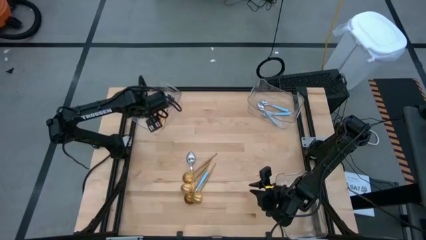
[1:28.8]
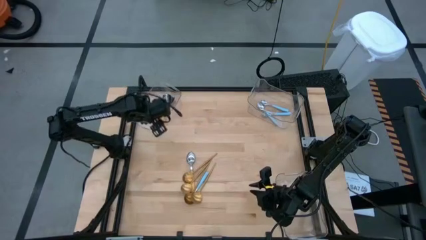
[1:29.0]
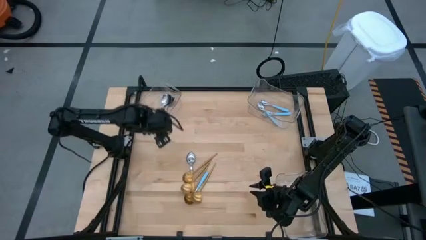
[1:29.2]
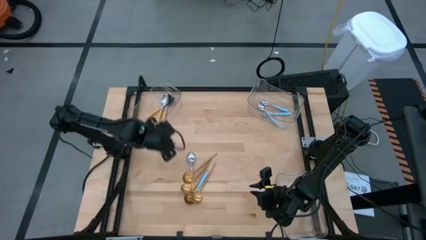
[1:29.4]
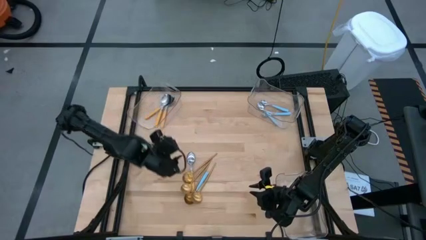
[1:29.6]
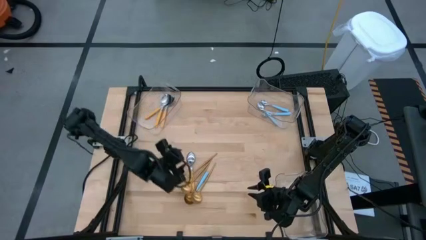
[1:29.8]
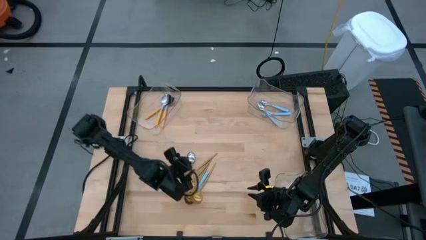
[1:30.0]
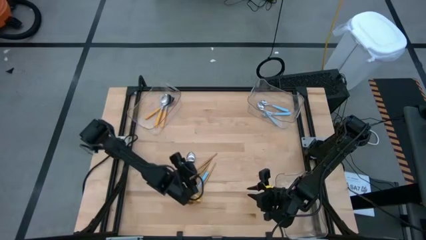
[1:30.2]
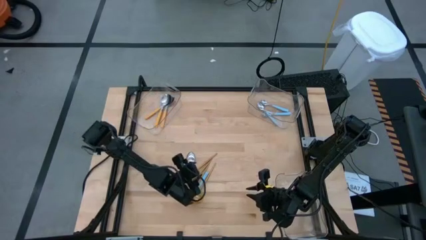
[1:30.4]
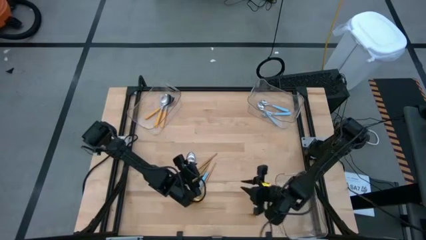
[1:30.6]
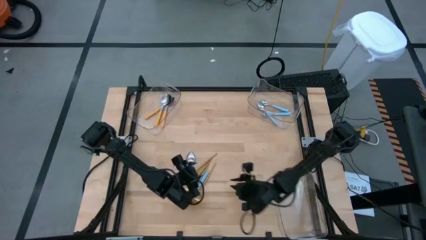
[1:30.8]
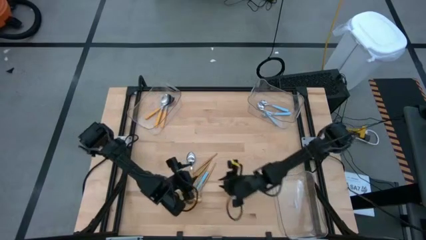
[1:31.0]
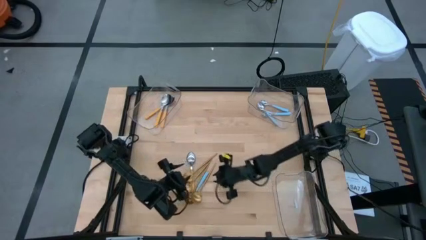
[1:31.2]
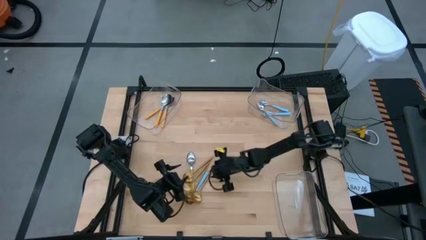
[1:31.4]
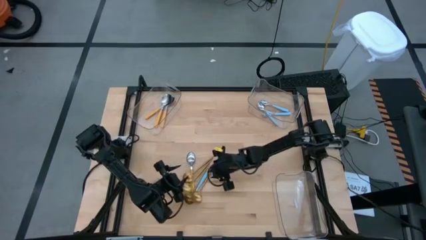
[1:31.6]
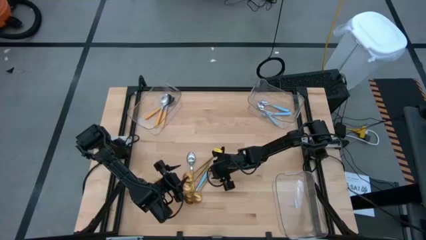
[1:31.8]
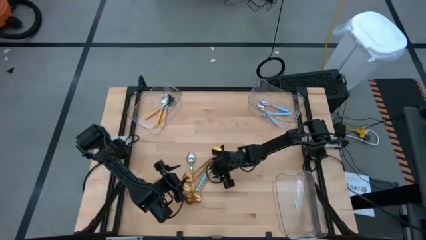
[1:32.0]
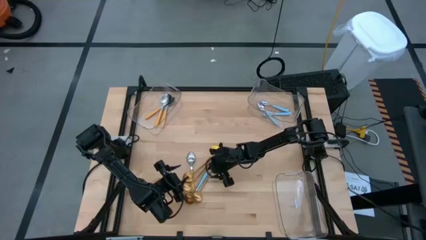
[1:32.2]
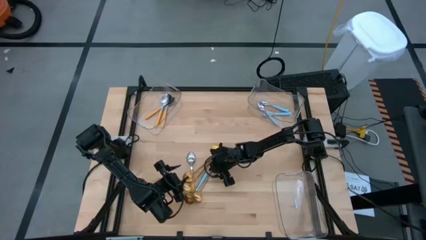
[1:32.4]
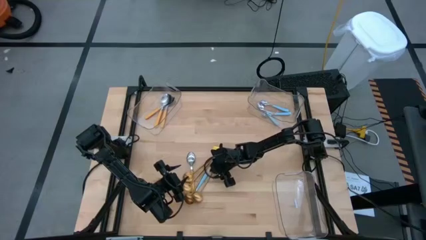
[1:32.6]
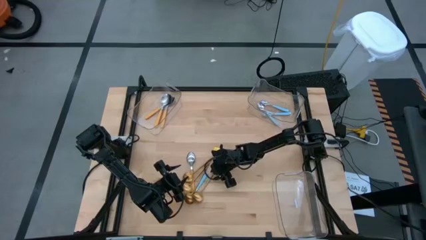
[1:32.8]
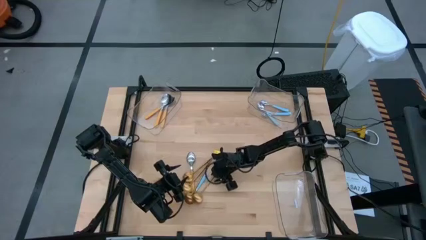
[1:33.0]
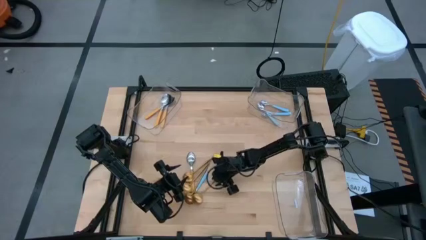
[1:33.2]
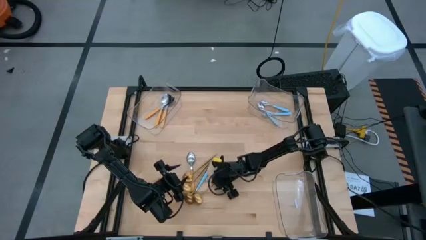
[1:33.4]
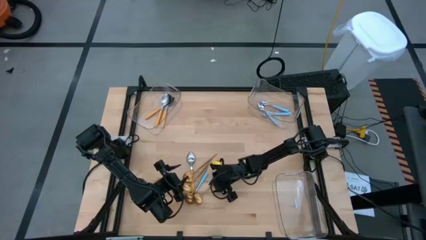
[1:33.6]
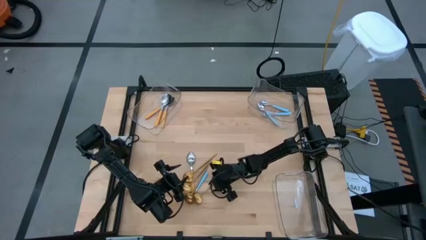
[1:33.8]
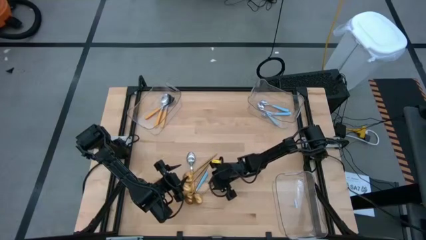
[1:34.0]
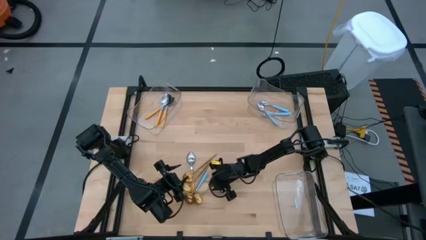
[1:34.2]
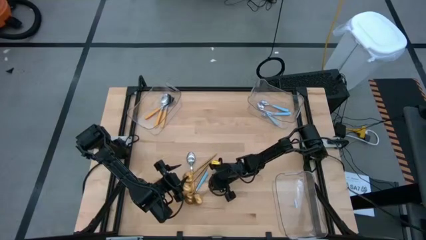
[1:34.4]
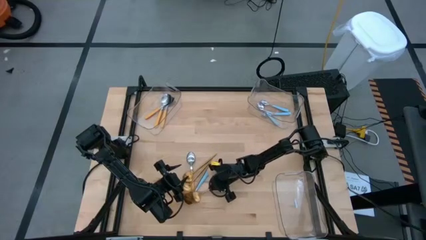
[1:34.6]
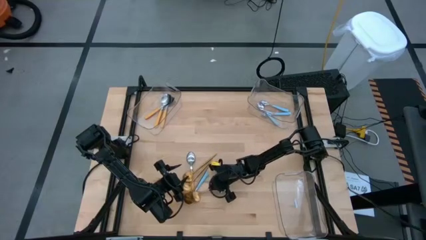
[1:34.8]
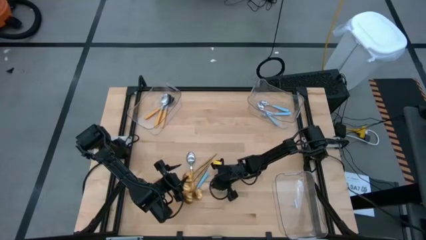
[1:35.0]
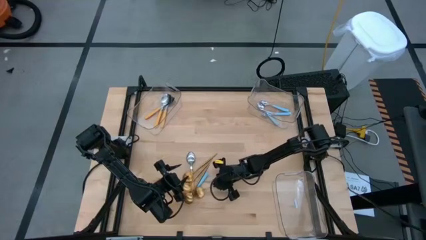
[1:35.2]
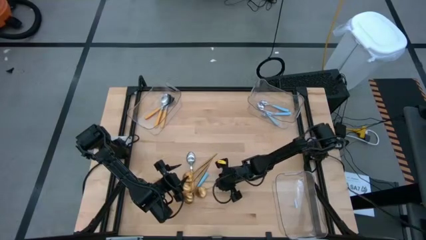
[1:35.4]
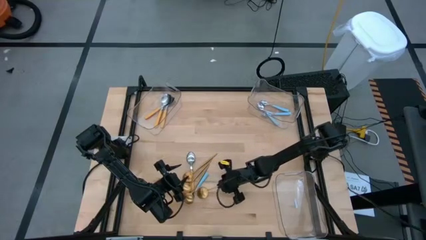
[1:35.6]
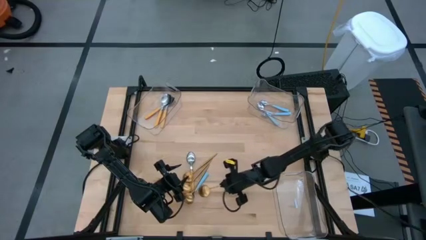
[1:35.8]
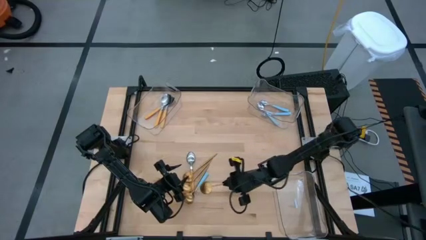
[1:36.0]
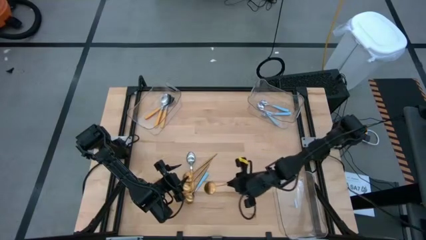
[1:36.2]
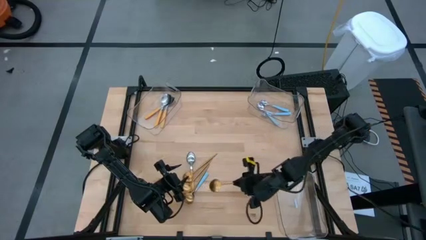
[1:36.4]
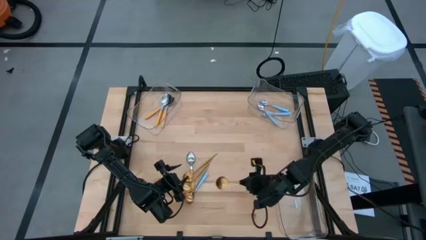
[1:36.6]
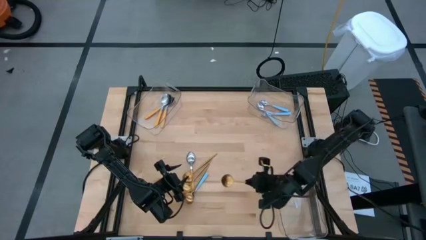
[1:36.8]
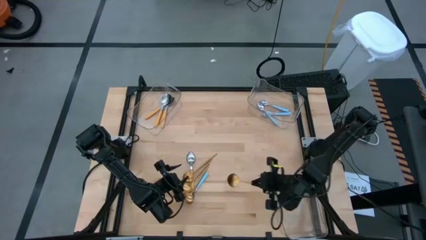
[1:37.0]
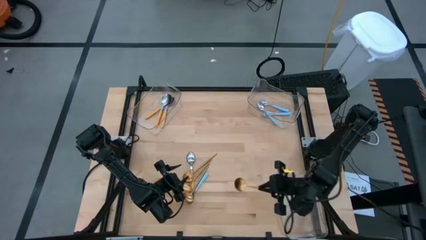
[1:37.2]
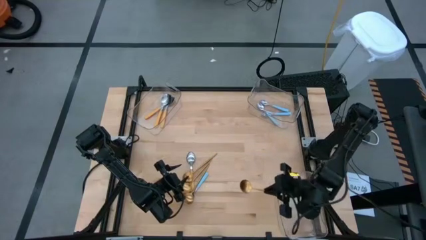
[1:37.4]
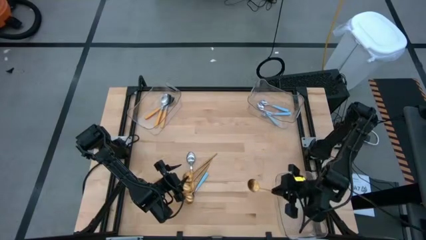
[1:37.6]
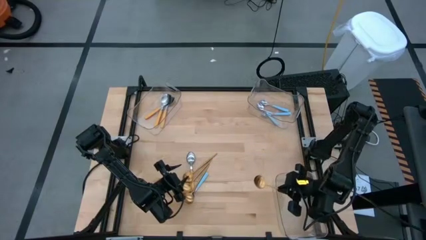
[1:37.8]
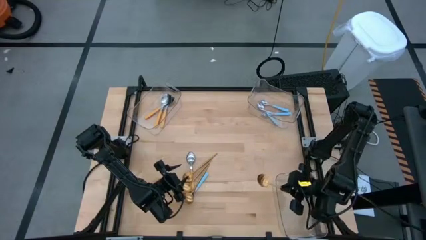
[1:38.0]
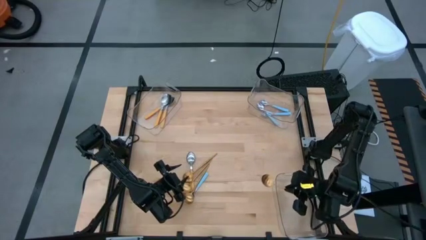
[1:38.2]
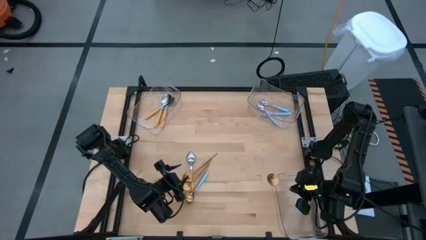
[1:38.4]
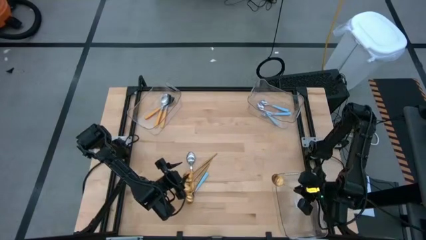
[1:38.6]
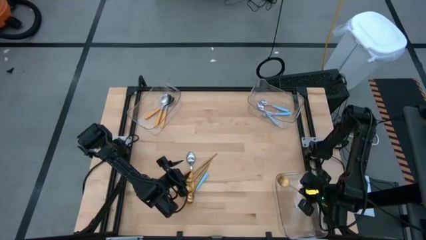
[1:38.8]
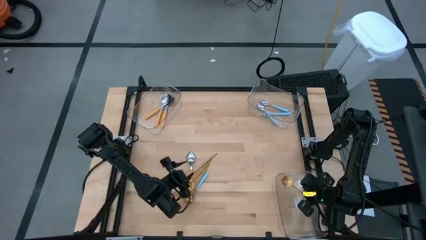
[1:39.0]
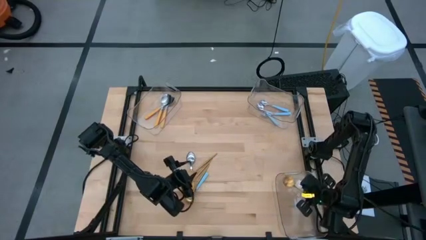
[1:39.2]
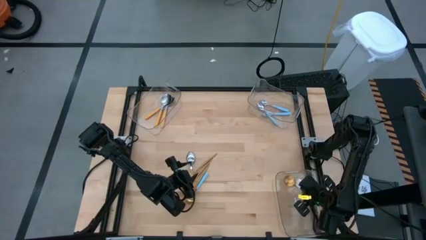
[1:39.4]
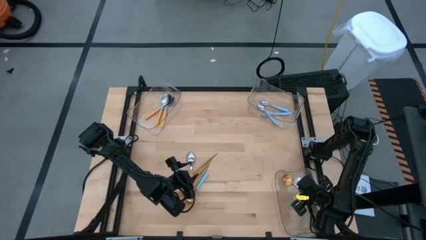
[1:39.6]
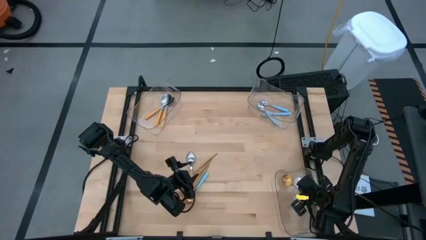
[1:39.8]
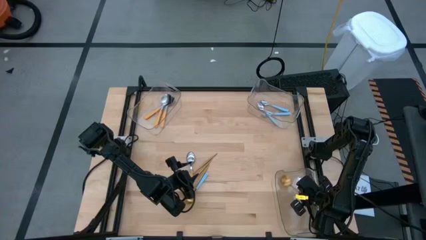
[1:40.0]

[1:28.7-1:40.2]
Task: Sort silverware by color (type)
Put the gold spoon into the bottom transparent bin

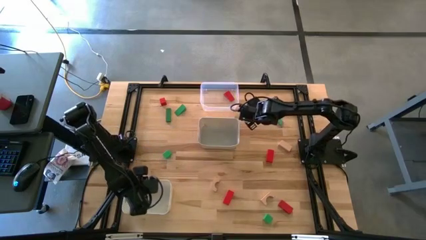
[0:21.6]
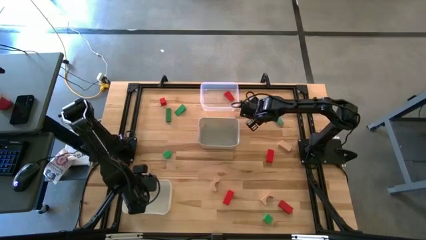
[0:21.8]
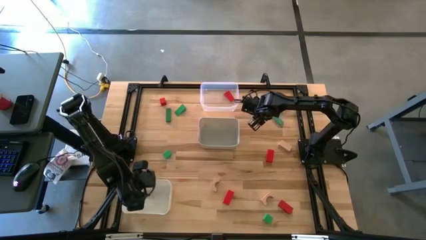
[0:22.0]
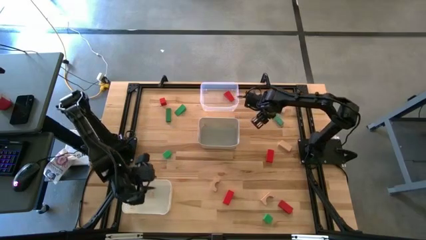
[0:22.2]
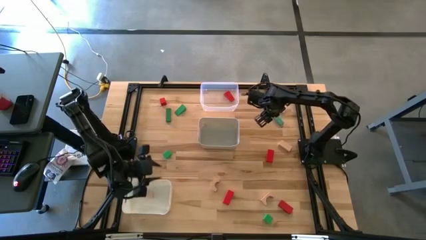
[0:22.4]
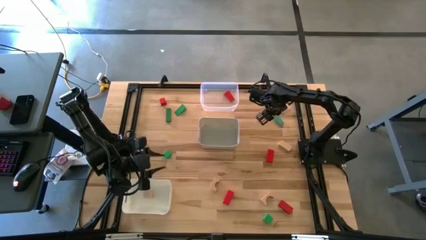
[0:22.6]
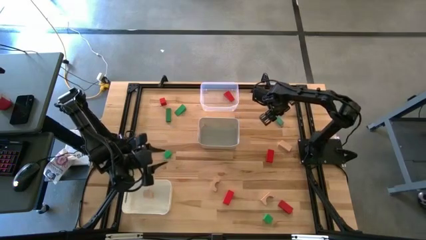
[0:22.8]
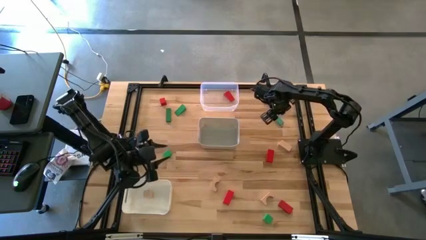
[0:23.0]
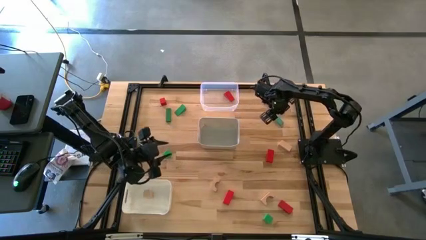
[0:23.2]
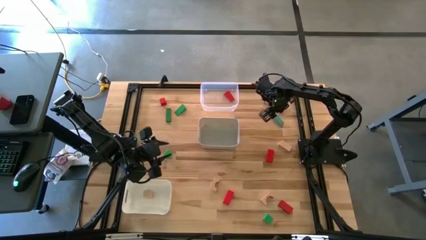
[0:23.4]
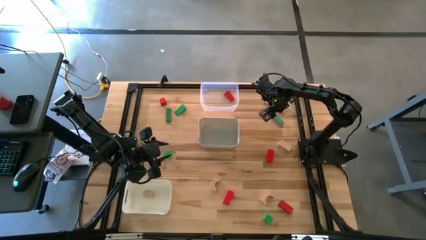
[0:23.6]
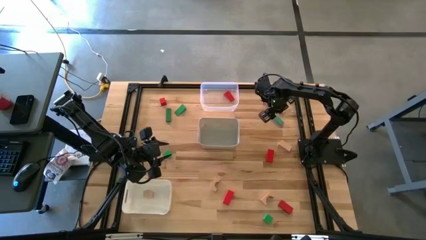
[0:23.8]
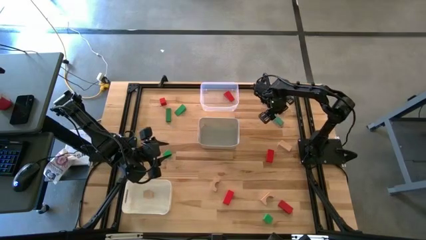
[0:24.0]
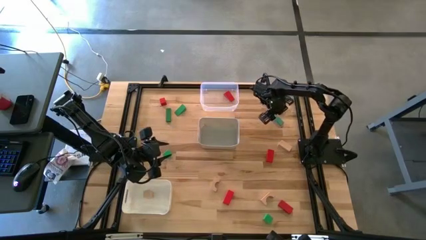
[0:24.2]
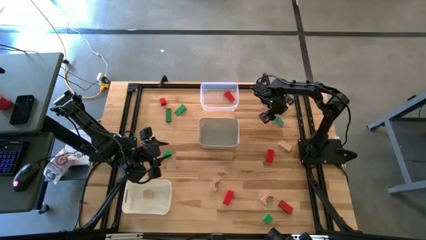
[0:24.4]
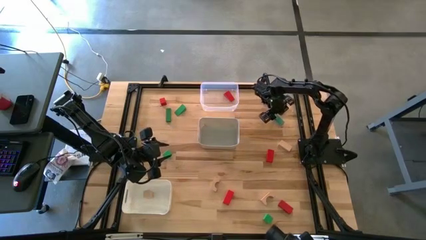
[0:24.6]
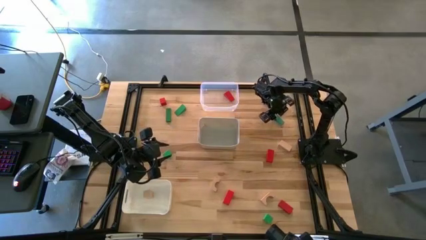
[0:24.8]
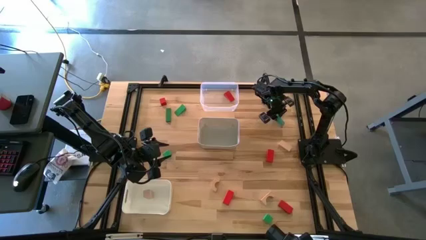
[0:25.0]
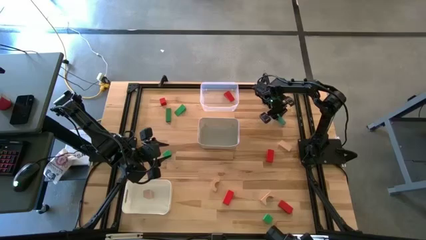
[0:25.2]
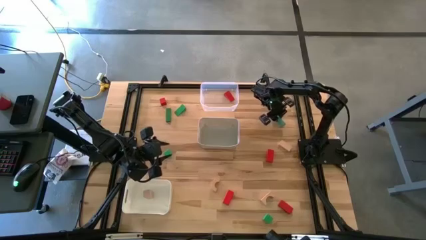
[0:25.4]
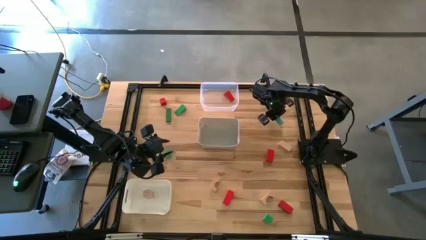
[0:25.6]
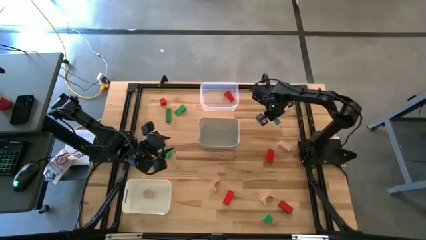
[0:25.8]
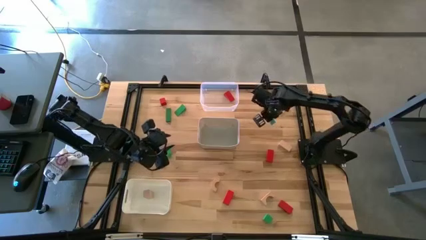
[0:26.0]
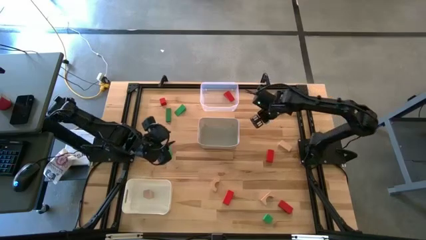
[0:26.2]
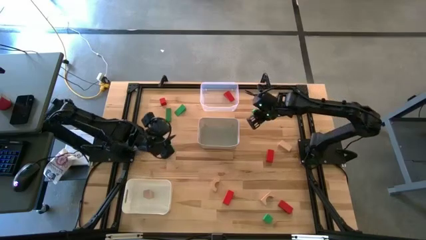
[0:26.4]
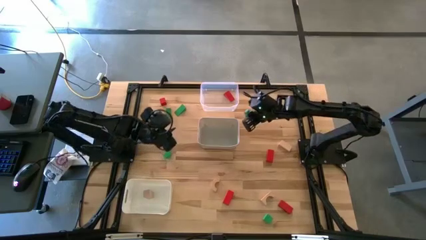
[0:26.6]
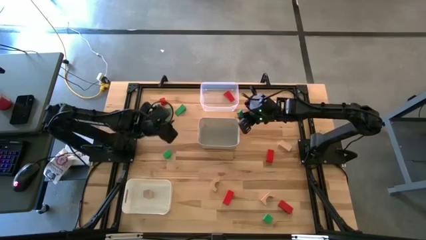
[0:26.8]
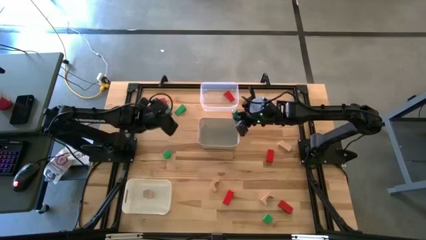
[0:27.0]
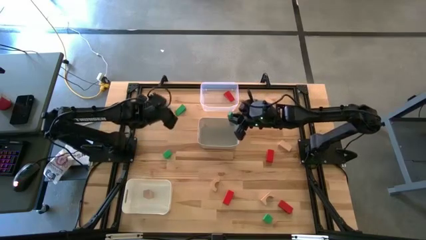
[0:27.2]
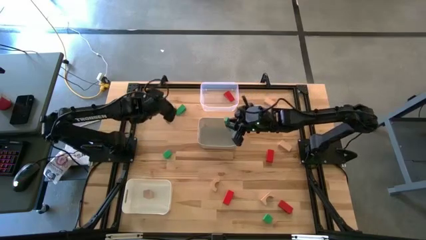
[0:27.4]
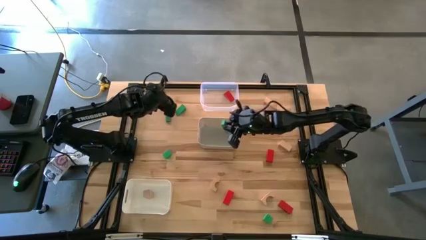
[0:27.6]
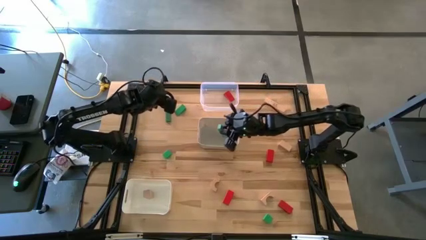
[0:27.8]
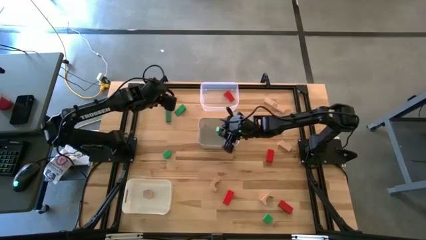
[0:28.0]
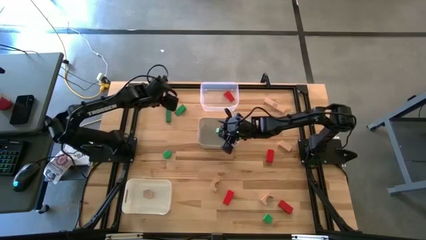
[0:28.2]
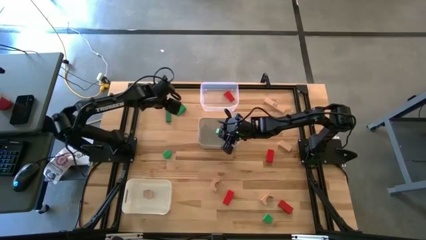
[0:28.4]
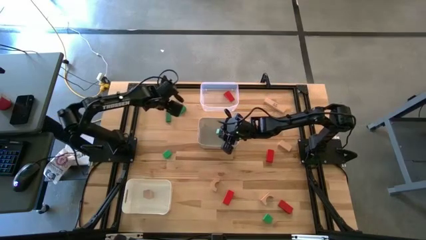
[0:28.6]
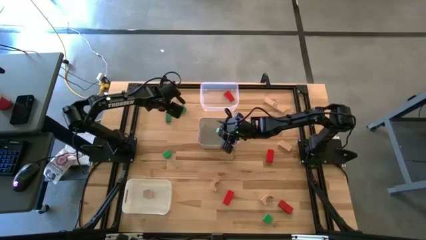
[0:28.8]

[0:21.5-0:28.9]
Task: Sort & place blocks by color
Put the right green rectangular block into the top white bin
